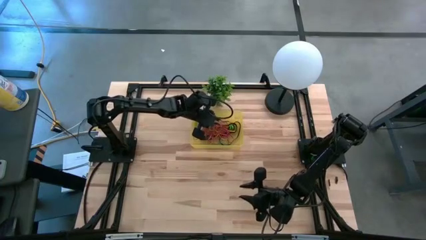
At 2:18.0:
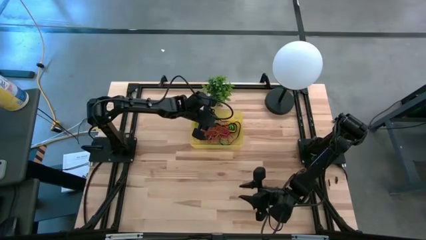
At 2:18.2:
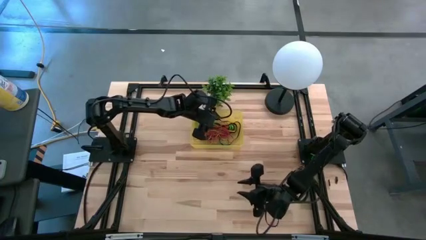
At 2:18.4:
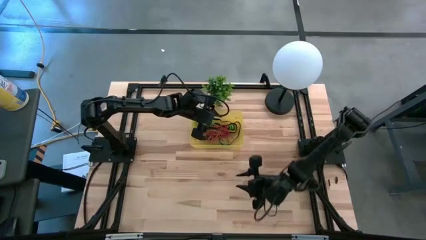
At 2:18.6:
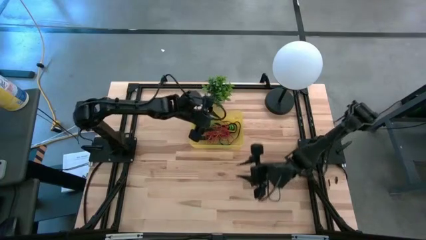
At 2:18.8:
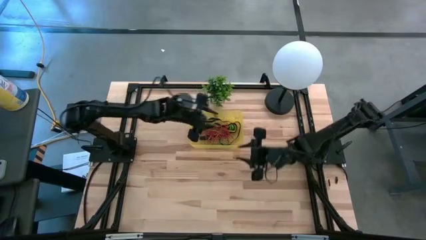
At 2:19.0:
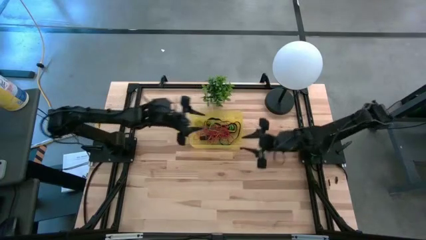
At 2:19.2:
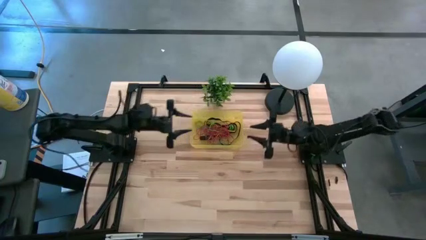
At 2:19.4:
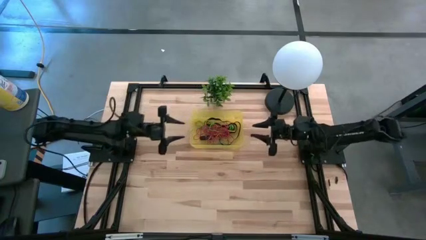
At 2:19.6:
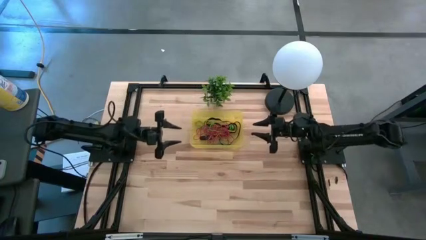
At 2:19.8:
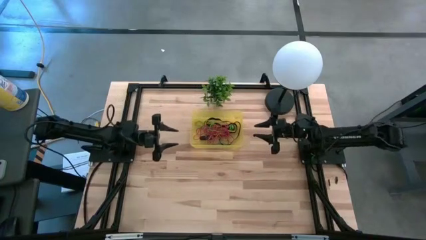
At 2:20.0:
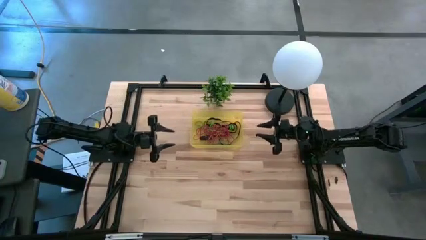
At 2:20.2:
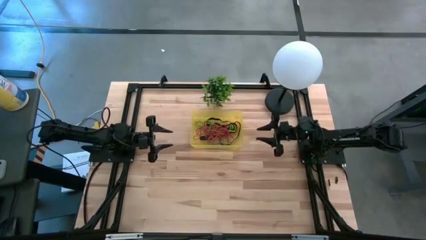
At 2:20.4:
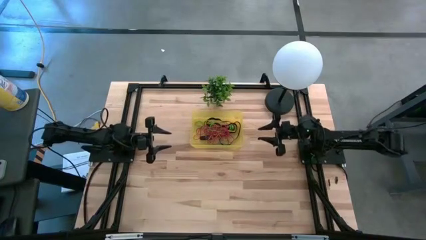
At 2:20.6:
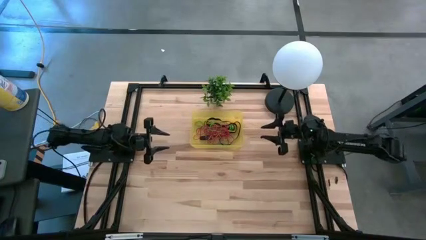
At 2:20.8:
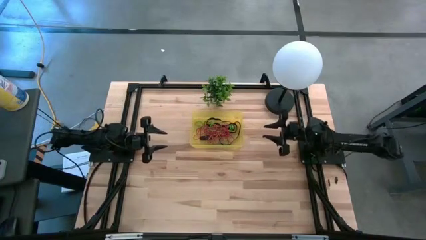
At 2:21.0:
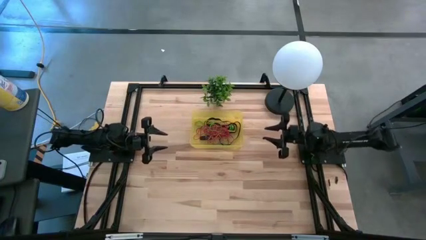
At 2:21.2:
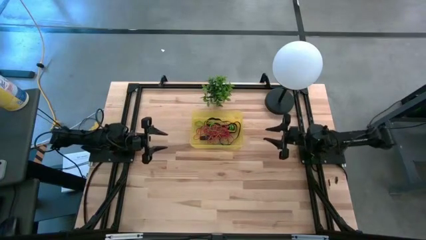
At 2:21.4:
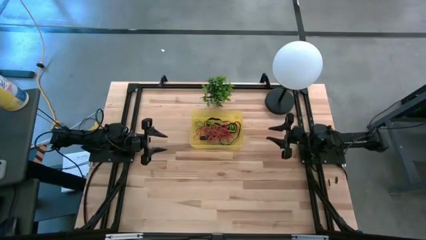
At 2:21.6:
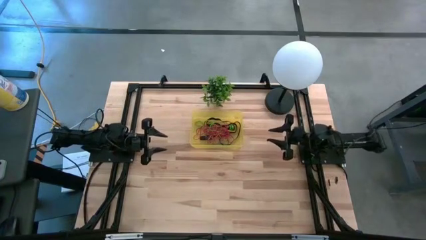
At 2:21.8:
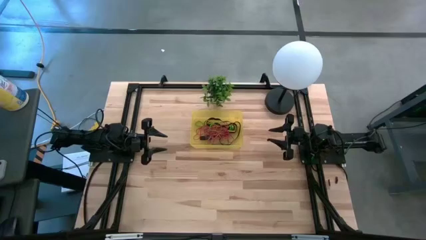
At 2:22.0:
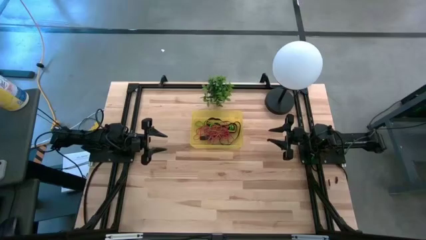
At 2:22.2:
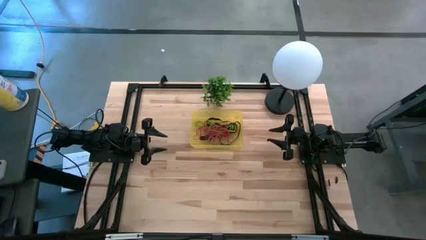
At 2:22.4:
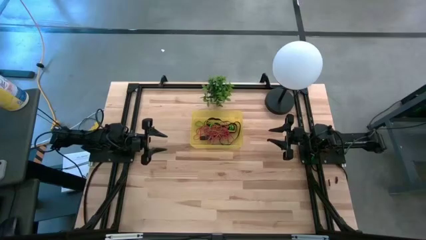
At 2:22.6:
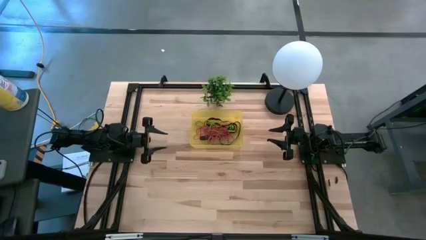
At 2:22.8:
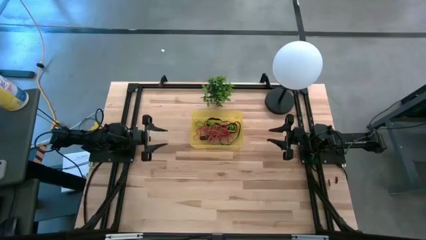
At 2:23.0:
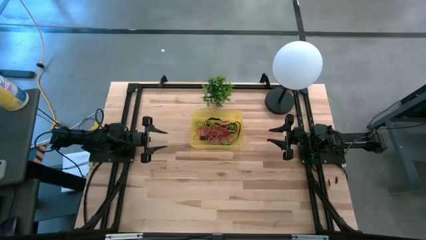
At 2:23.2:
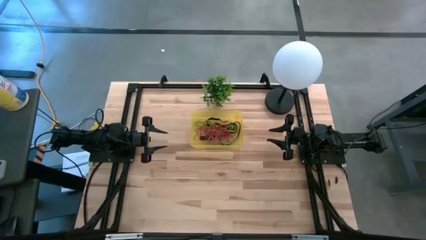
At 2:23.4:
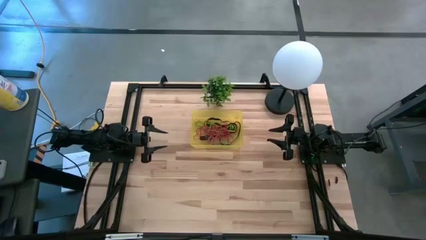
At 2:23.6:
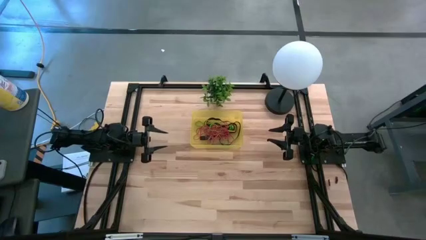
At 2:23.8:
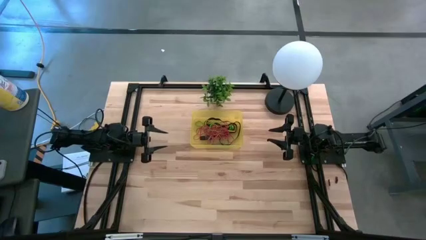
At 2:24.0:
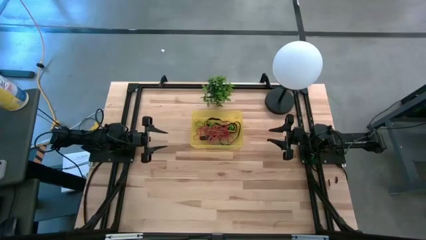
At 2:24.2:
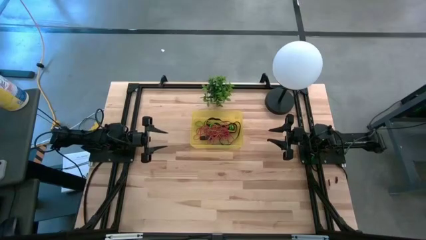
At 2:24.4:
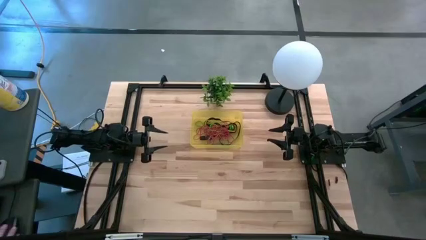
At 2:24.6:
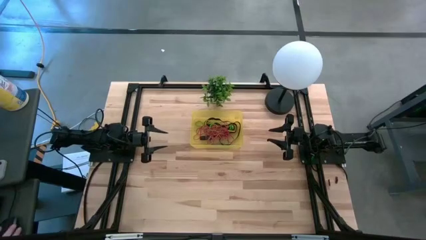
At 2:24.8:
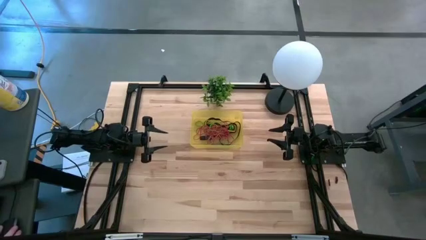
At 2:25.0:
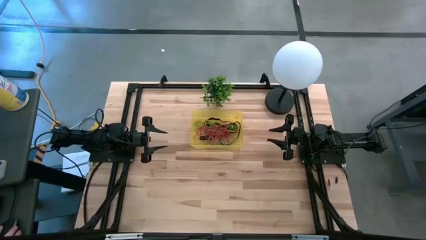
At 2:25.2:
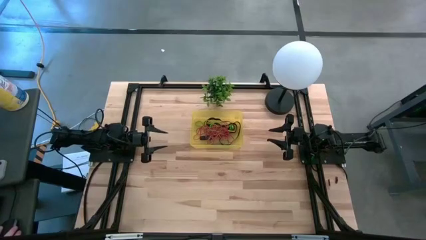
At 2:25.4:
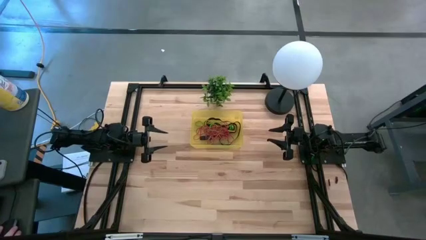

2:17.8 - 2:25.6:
Task: Pick and place rubber bands into bin
Return to Home Position

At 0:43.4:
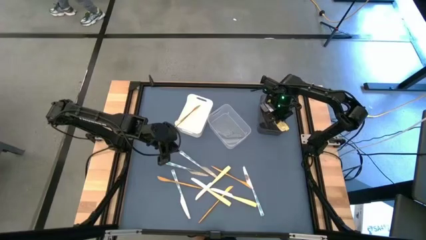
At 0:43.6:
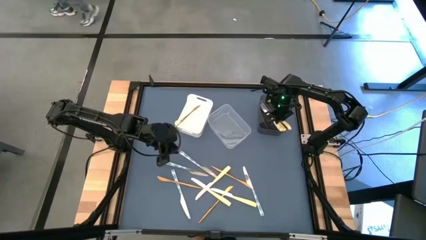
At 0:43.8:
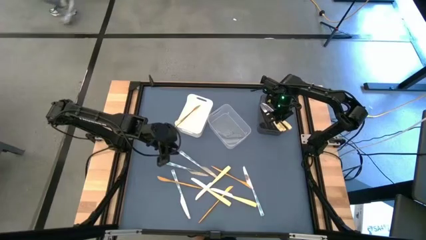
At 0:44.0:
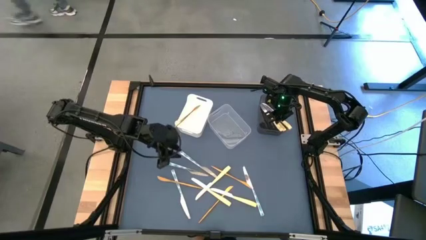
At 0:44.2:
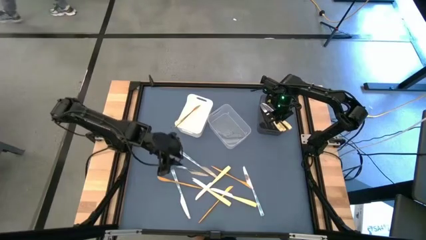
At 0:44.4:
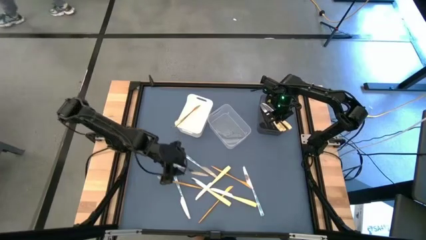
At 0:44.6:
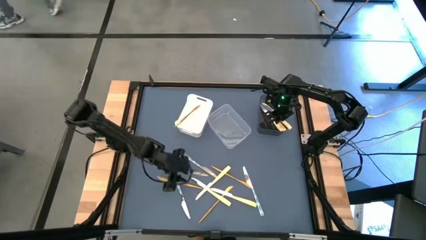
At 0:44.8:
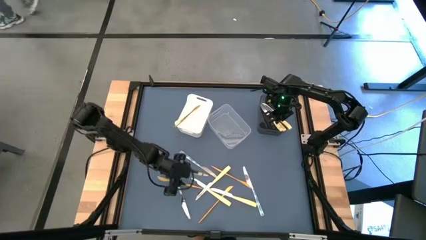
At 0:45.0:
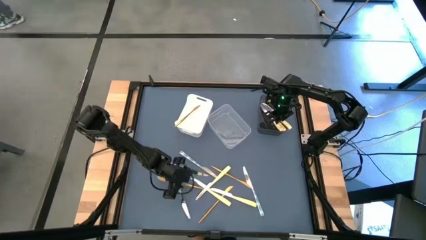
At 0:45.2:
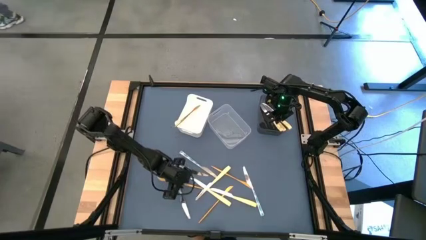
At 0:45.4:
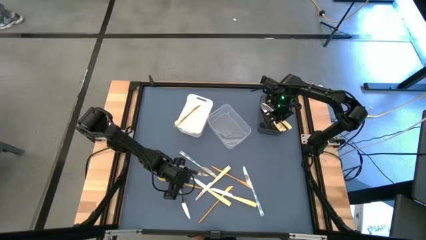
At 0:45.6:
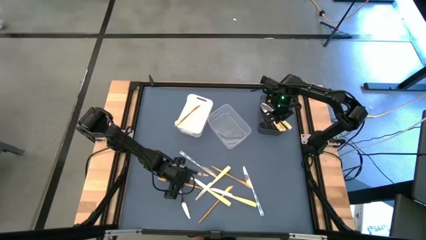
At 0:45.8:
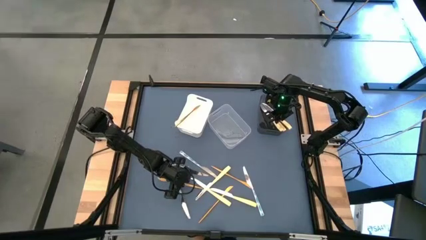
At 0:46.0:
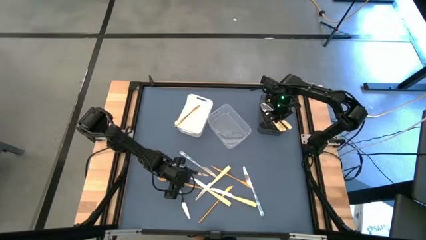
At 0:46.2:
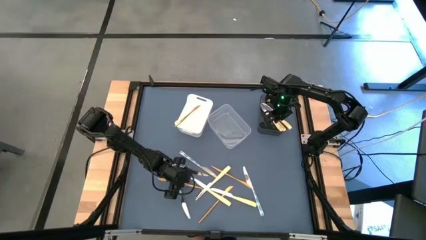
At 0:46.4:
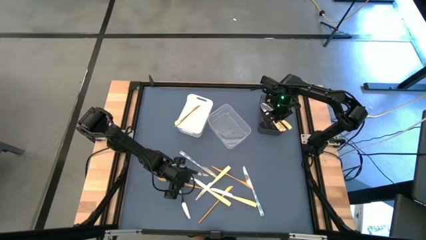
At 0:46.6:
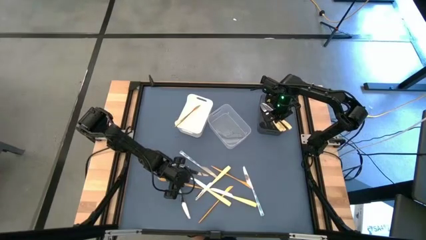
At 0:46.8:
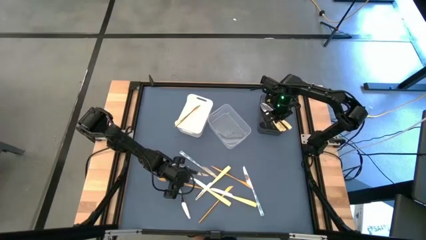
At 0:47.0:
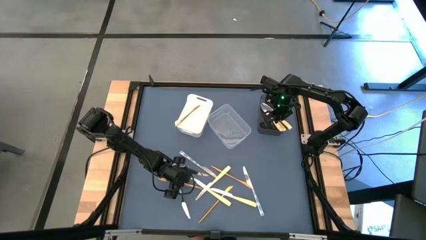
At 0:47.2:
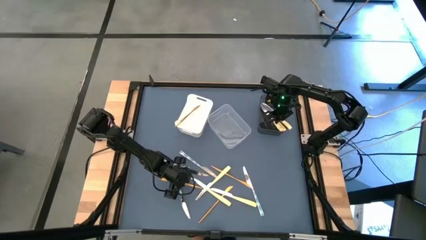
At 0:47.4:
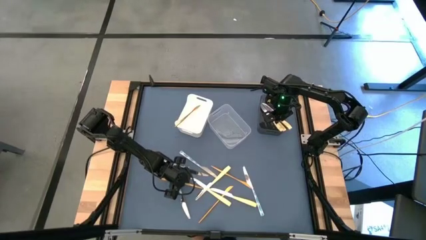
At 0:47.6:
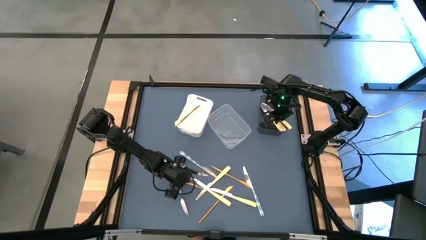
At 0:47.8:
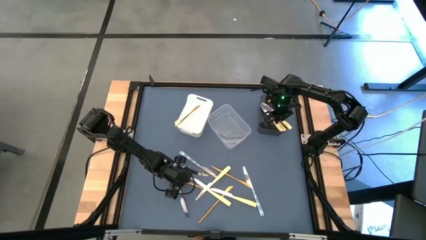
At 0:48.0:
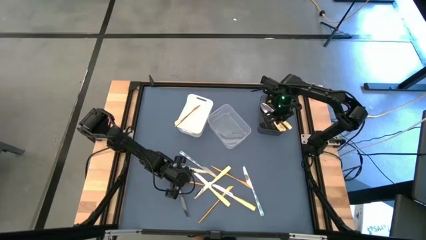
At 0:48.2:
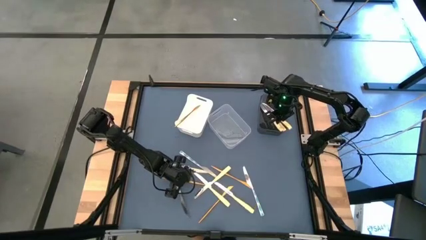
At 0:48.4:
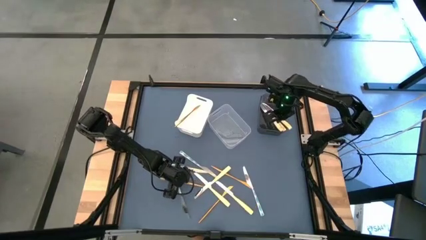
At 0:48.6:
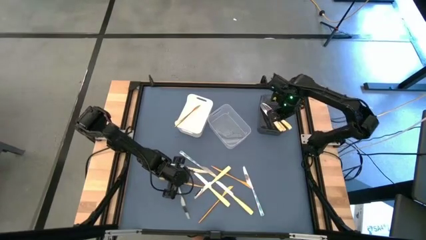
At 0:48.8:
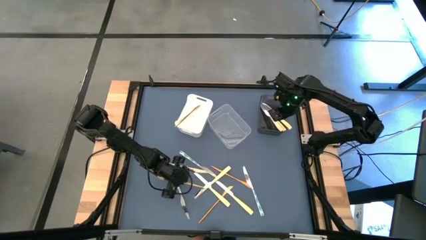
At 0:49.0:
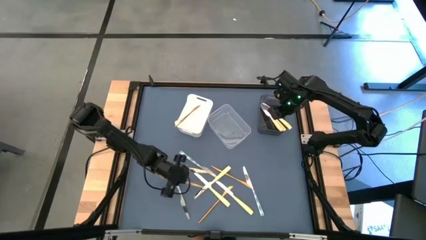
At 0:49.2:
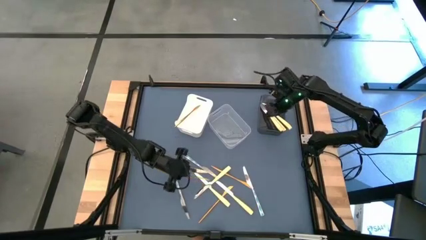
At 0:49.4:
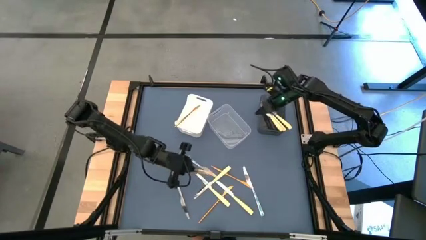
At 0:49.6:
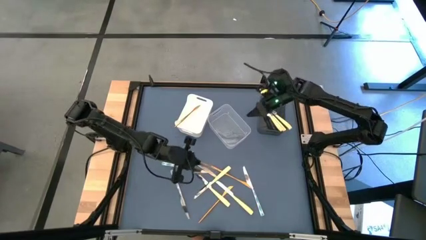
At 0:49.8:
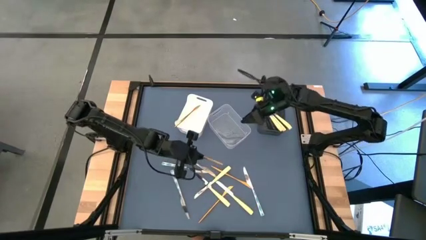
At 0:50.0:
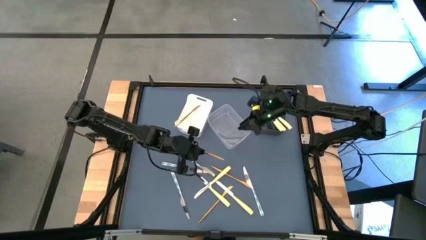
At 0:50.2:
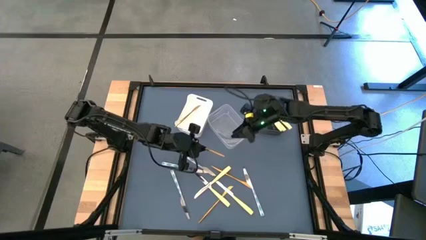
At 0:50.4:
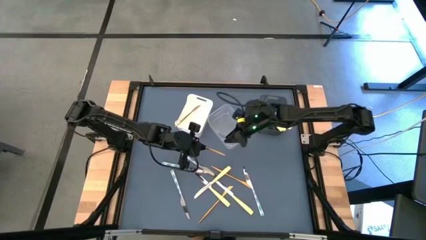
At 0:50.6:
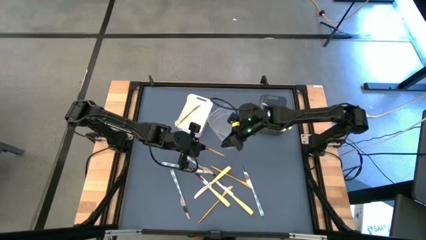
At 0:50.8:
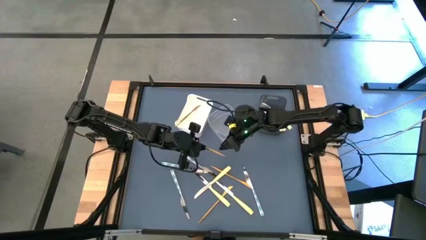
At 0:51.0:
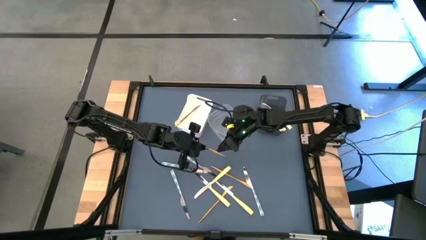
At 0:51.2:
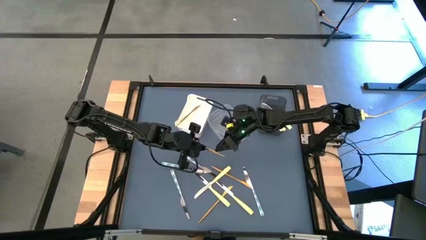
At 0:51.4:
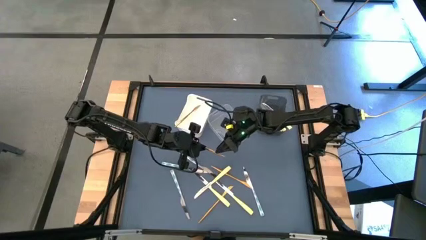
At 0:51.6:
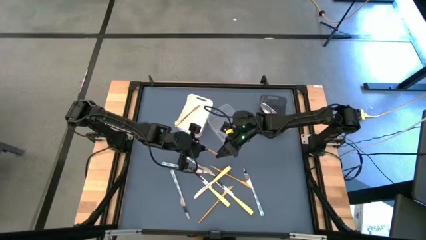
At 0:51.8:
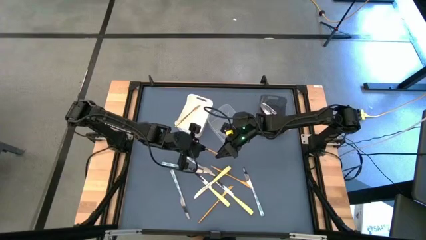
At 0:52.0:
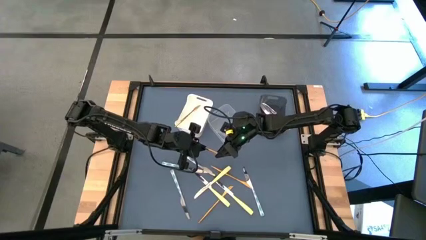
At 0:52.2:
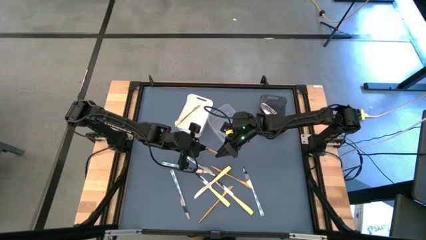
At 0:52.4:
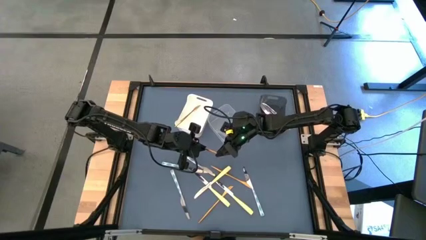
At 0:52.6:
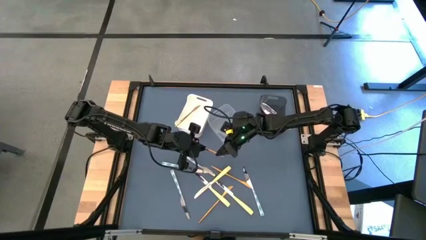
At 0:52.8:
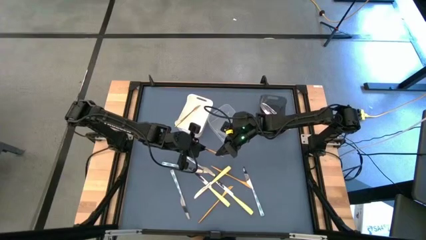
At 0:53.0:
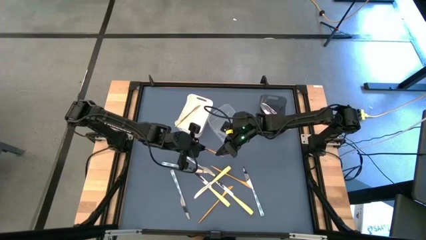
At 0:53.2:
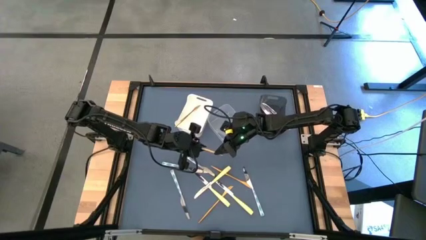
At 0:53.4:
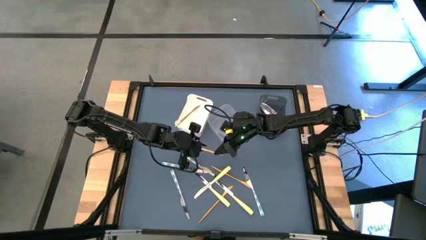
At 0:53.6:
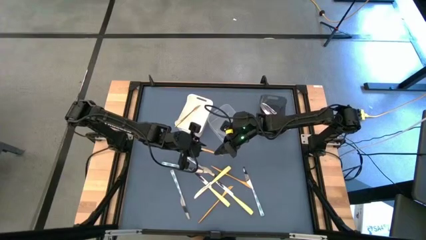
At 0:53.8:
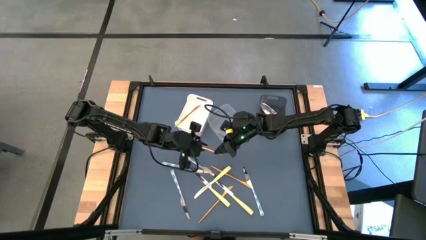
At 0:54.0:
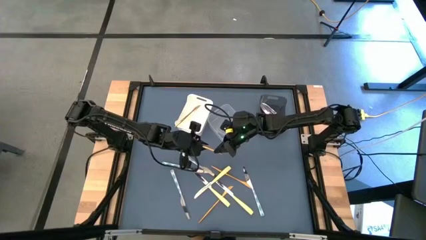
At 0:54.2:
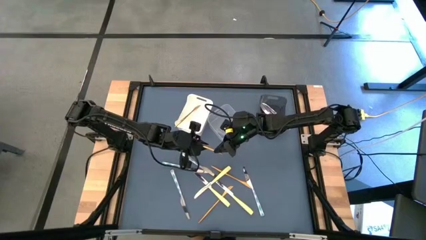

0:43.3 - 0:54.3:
Task: Sort silverware by color (type)
Put the gold knife into the white bin
